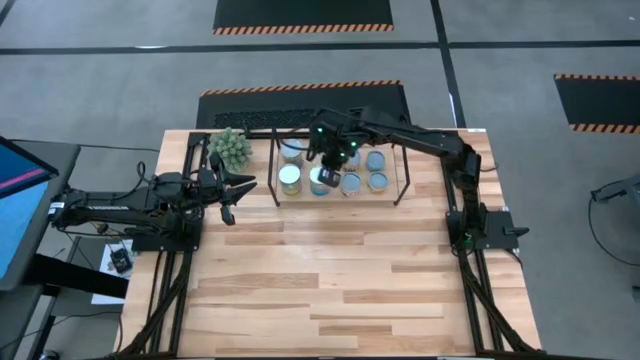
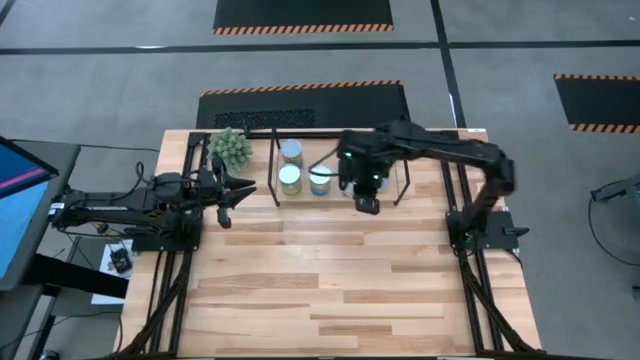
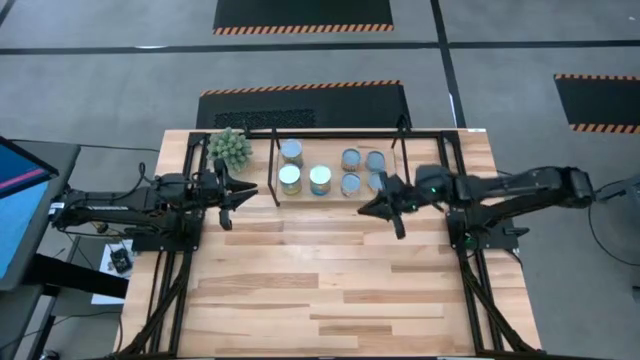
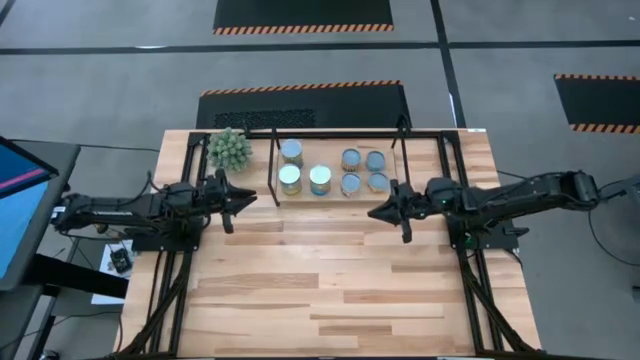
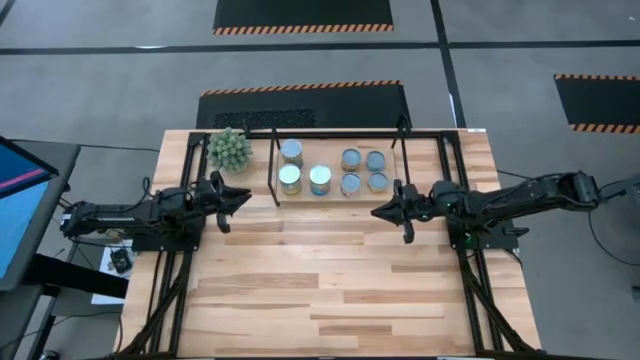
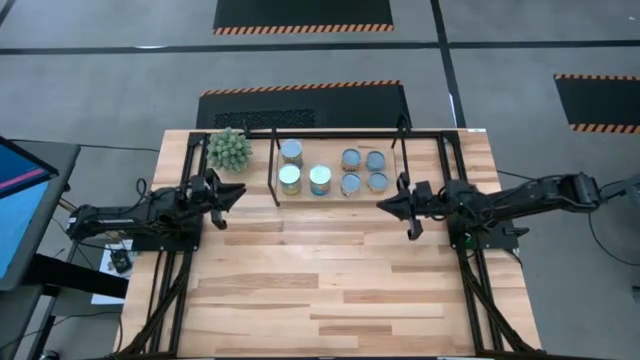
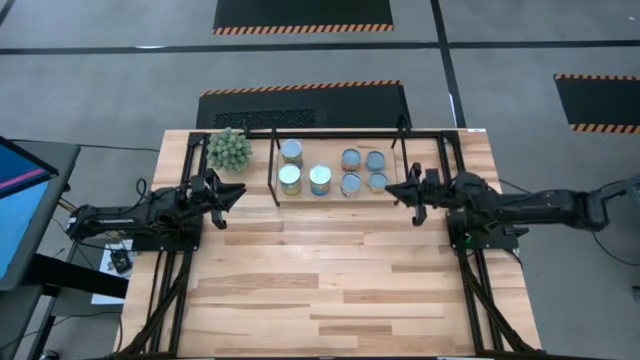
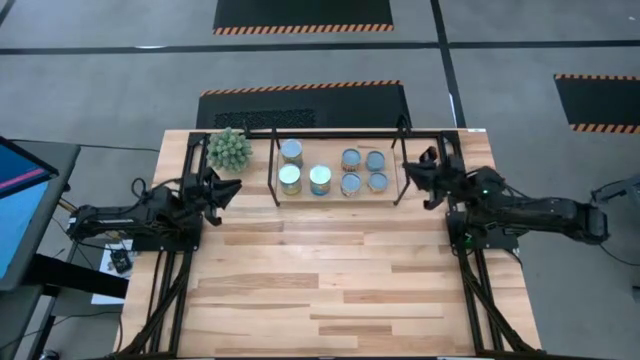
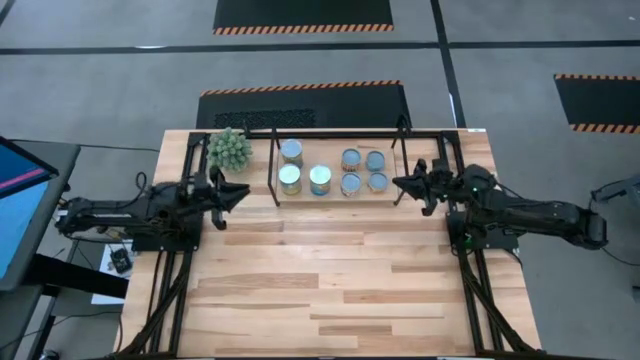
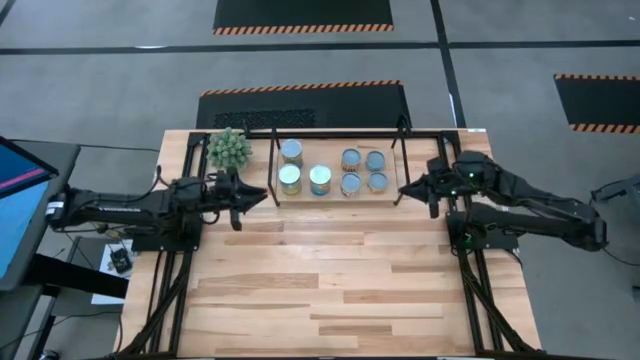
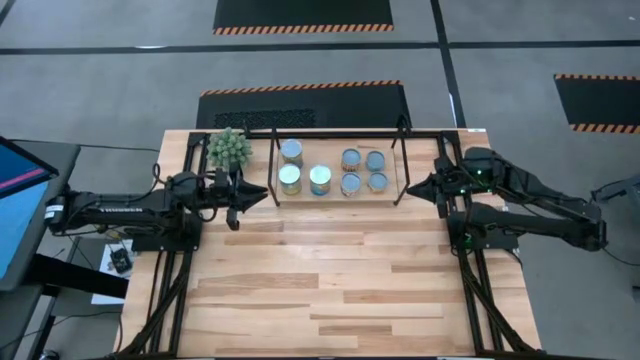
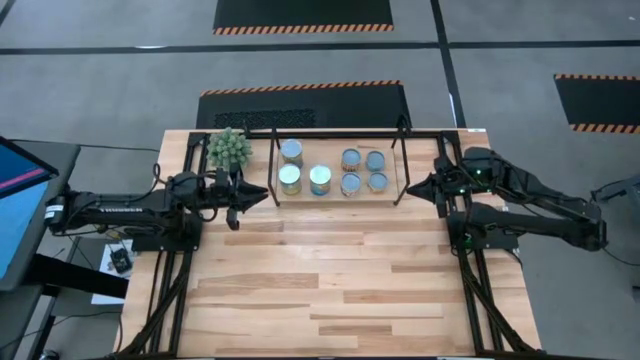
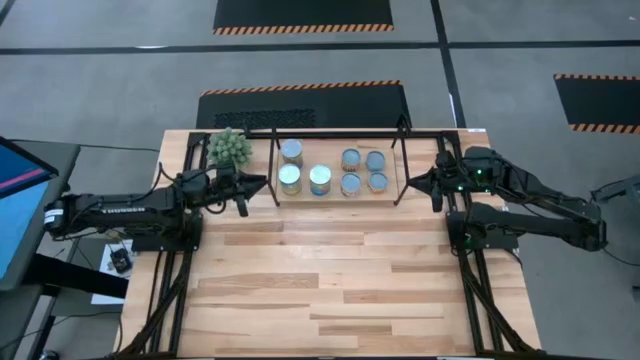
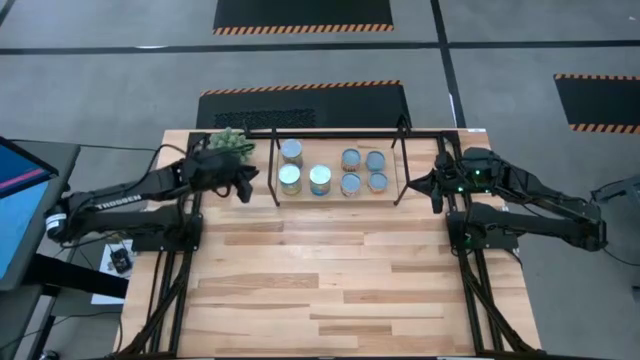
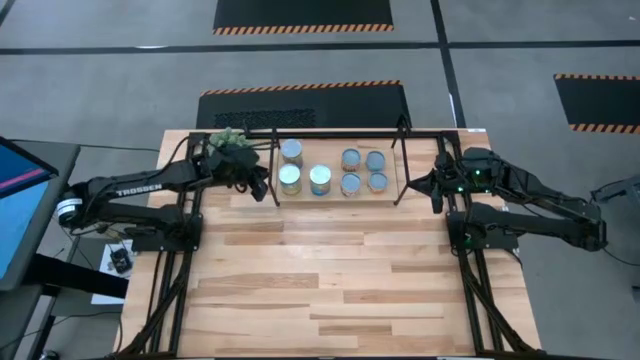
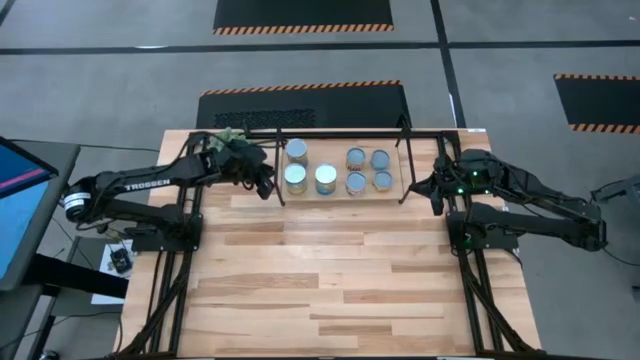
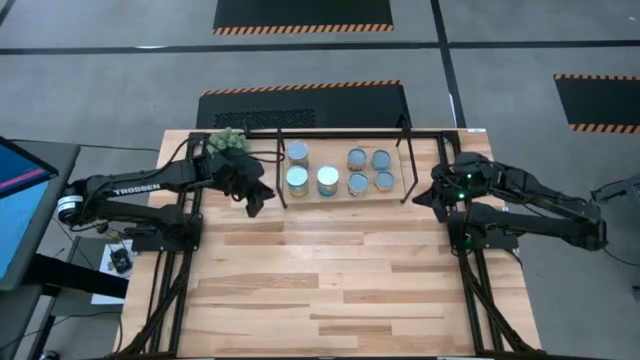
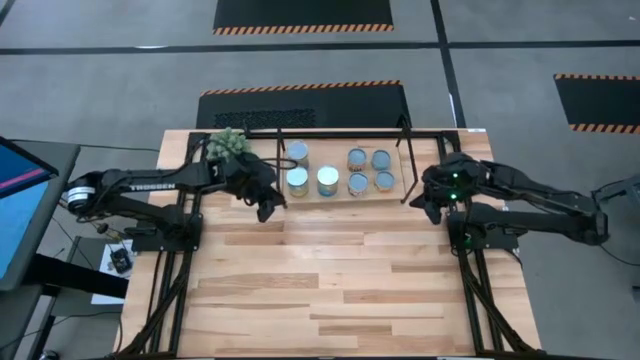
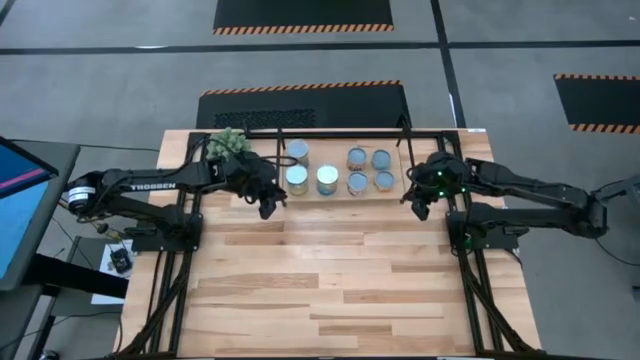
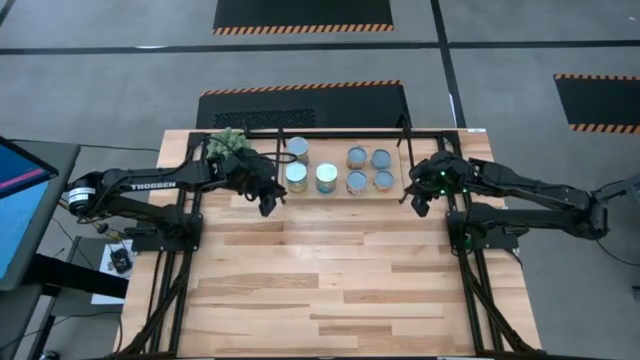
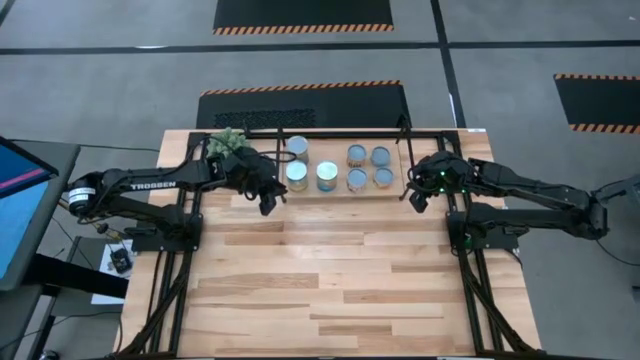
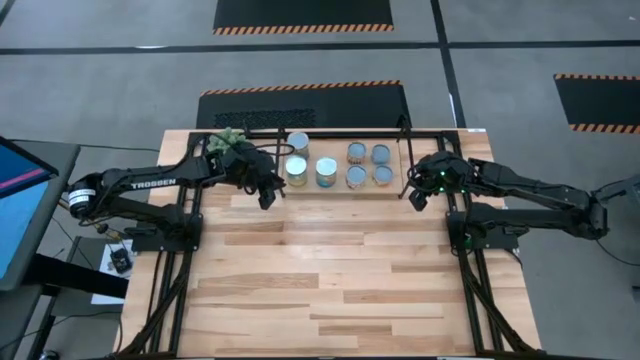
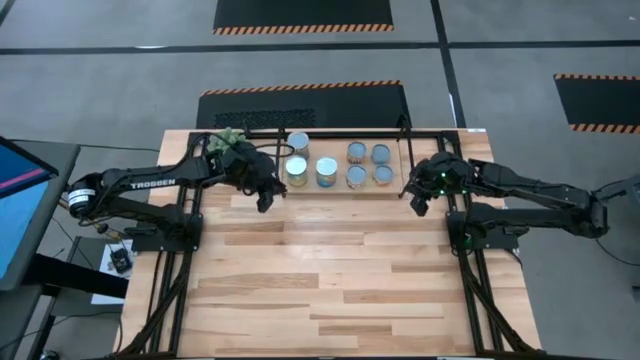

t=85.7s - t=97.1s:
Task: Pick and place cans onto a shelf
Adjust the shelf

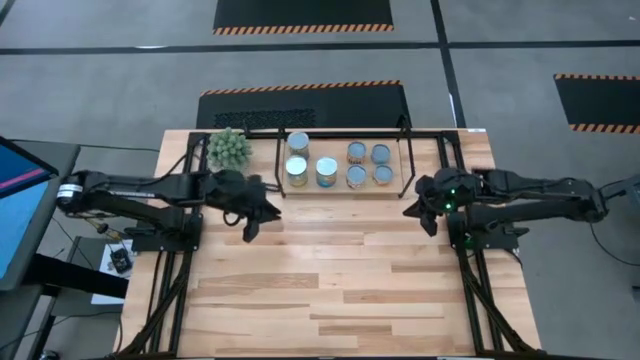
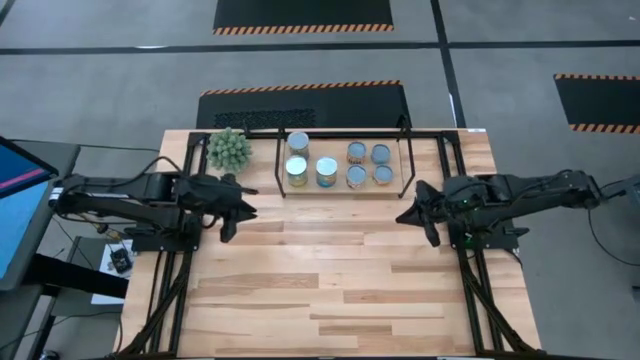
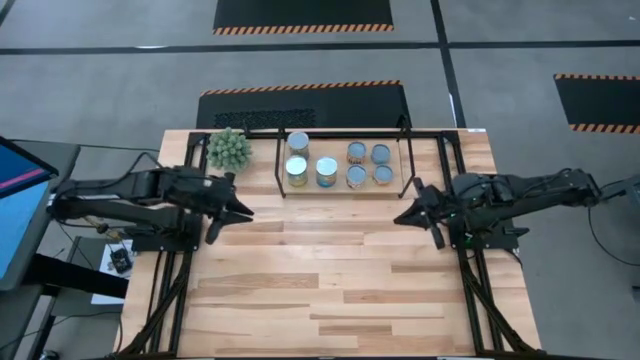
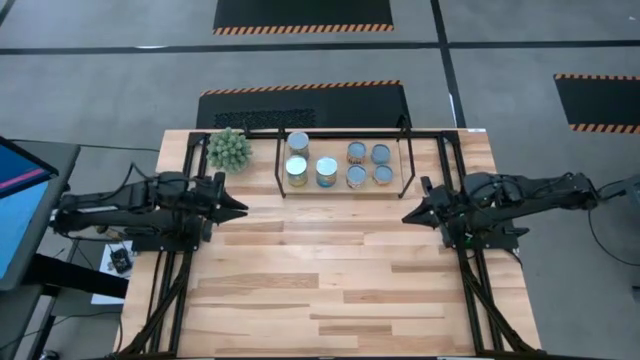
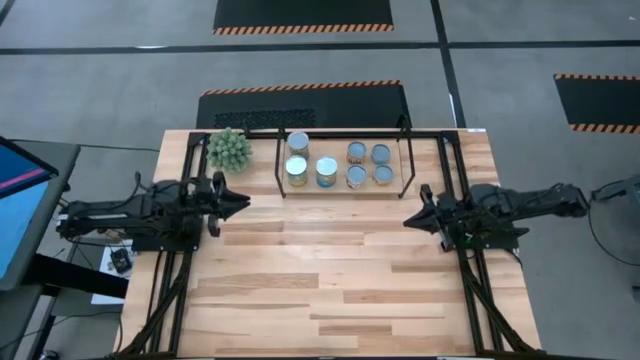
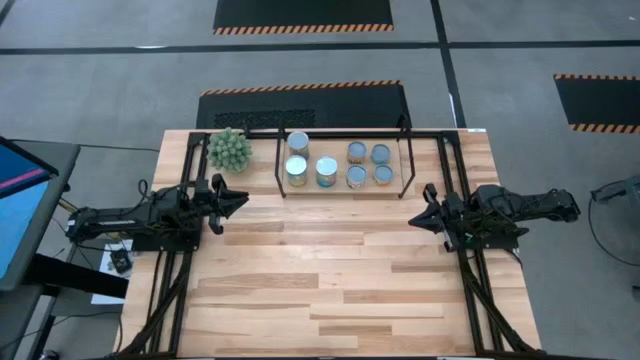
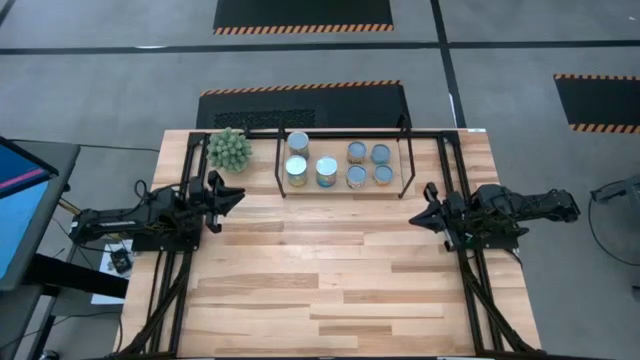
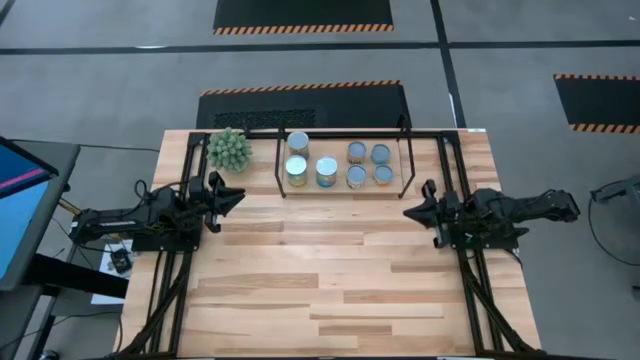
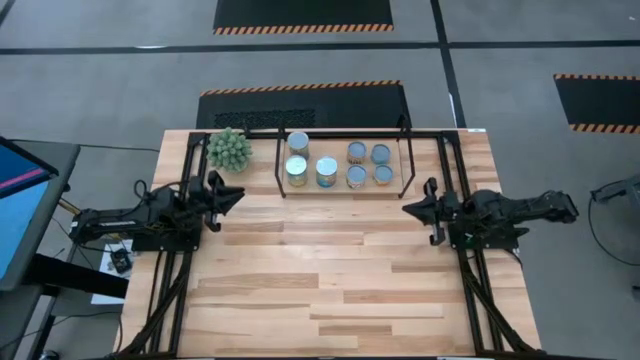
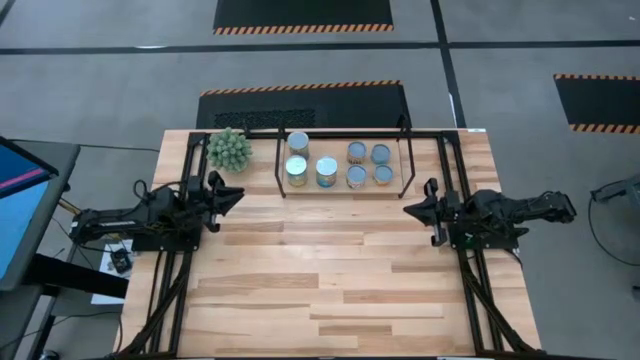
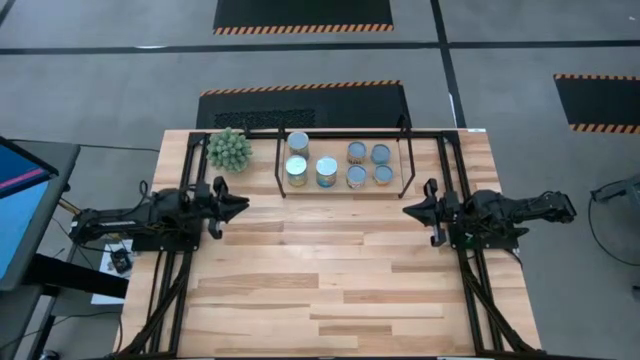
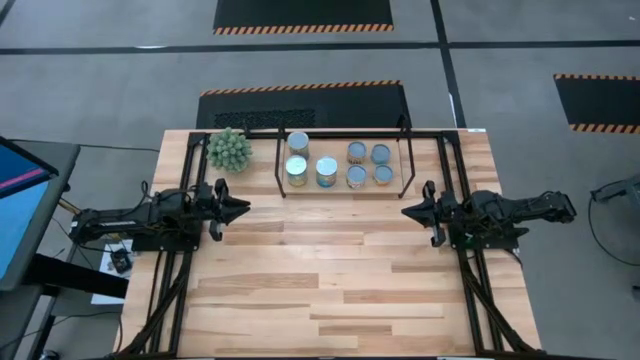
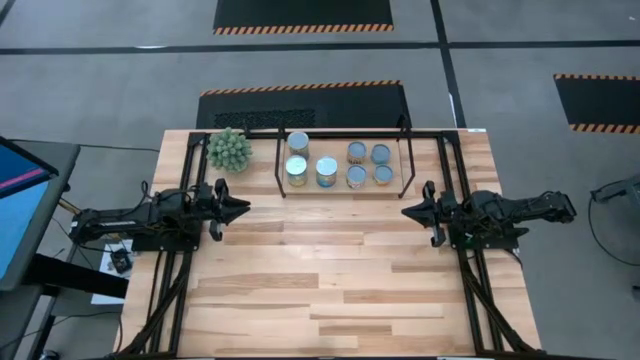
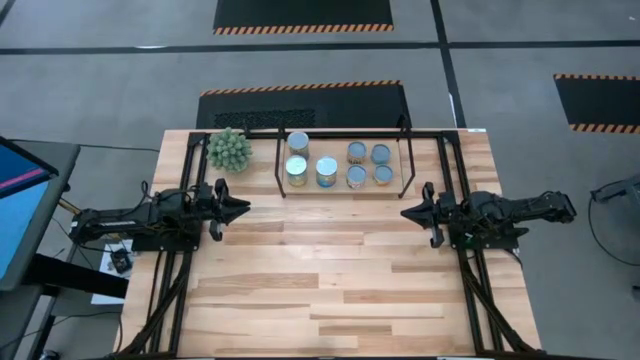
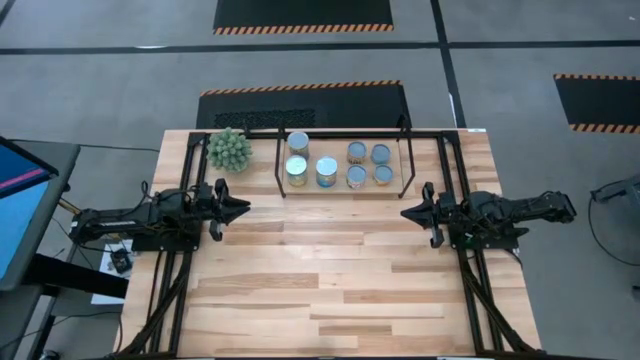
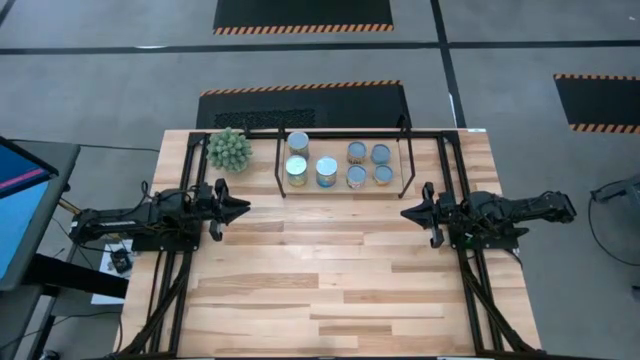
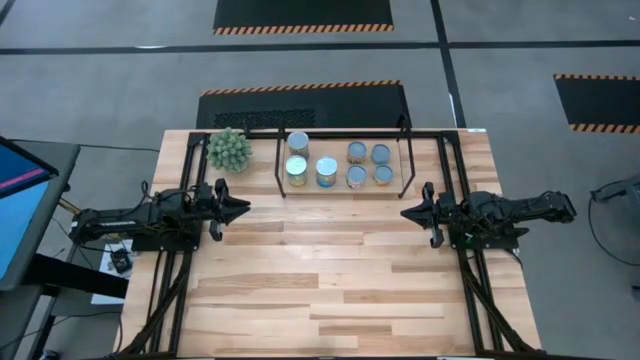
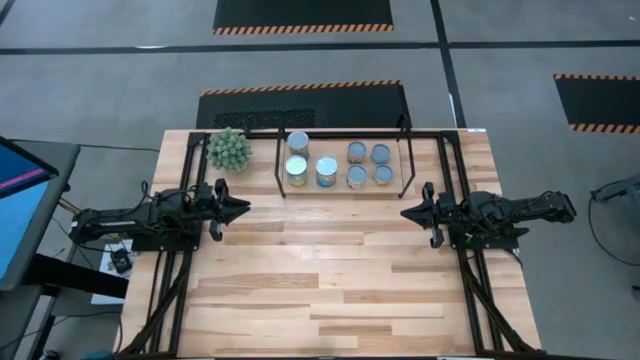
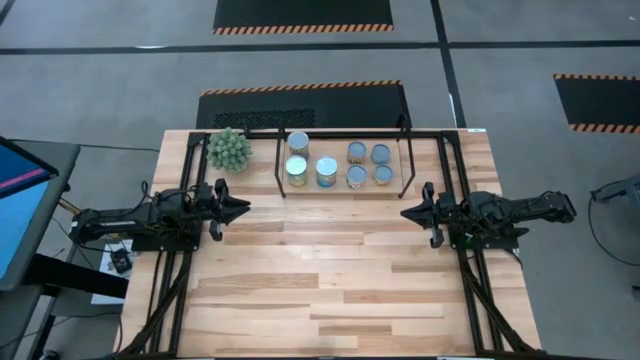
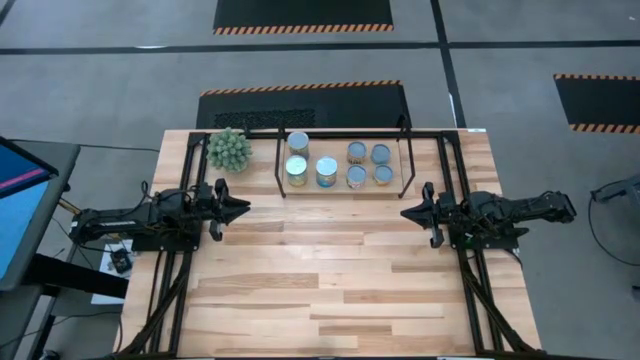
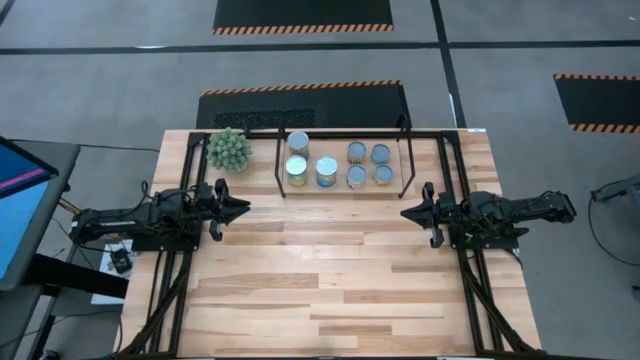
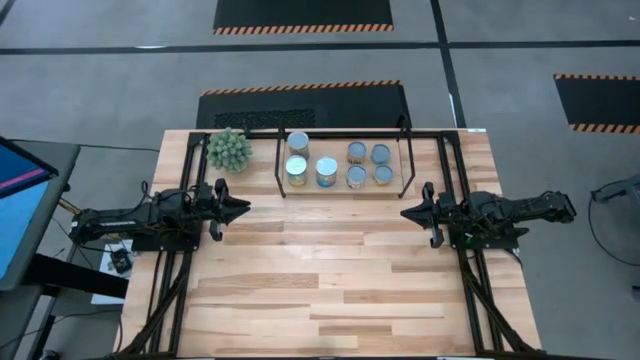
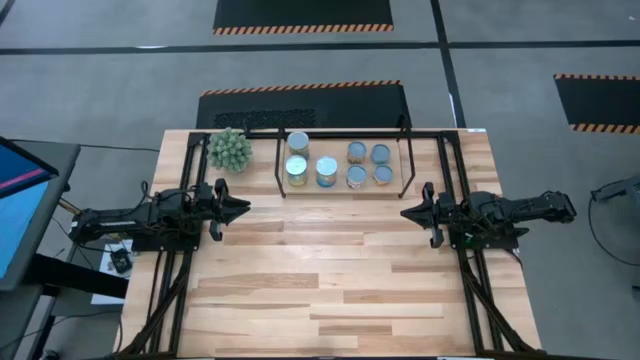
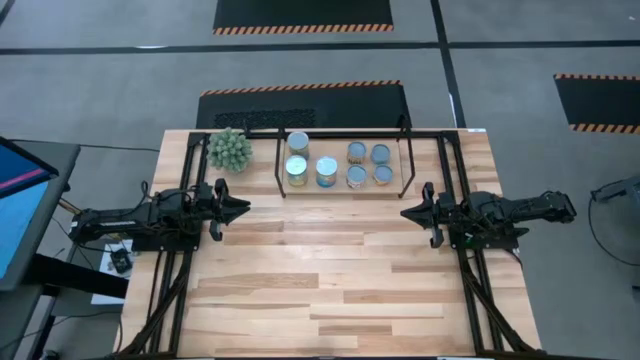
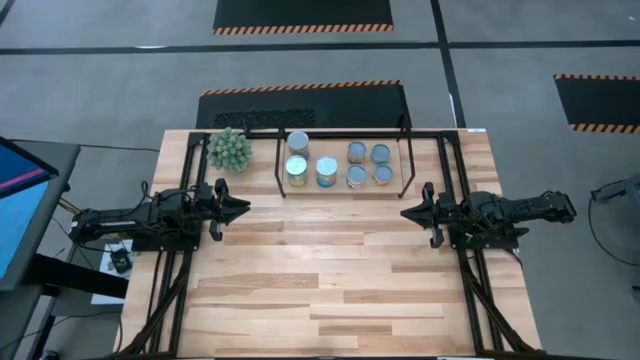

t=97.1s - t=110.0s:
Return to Home Position
